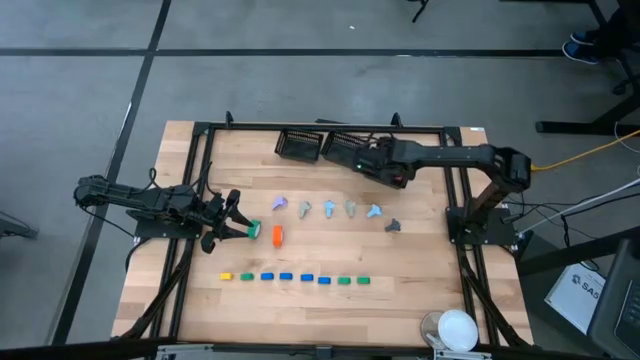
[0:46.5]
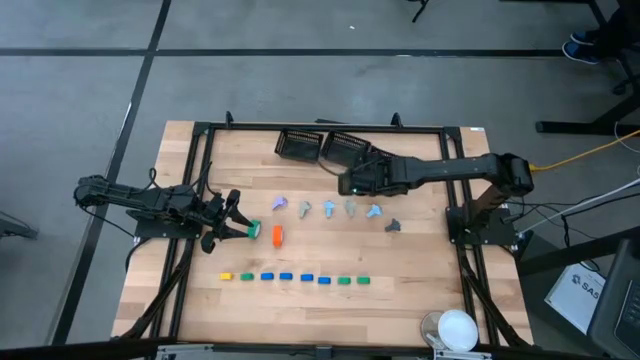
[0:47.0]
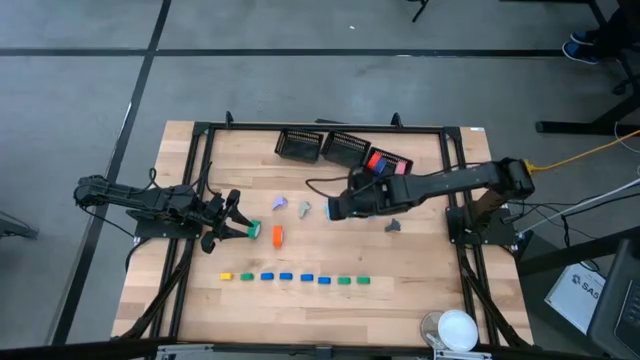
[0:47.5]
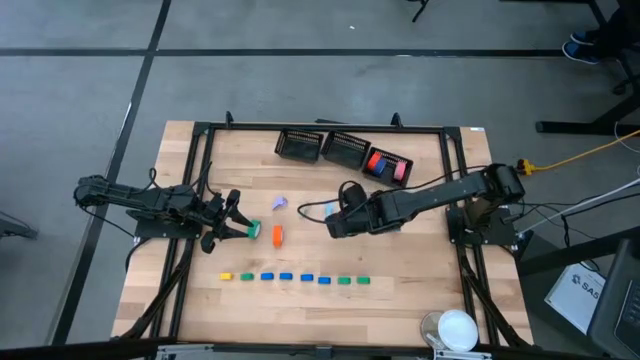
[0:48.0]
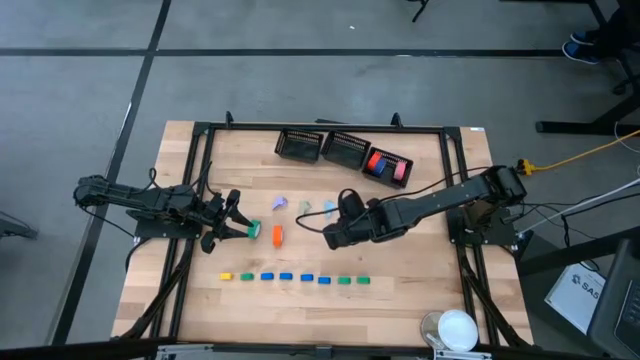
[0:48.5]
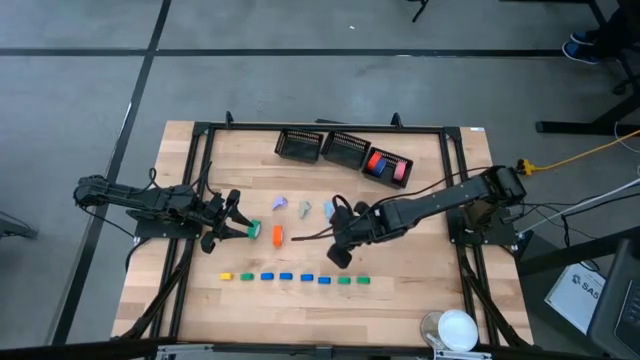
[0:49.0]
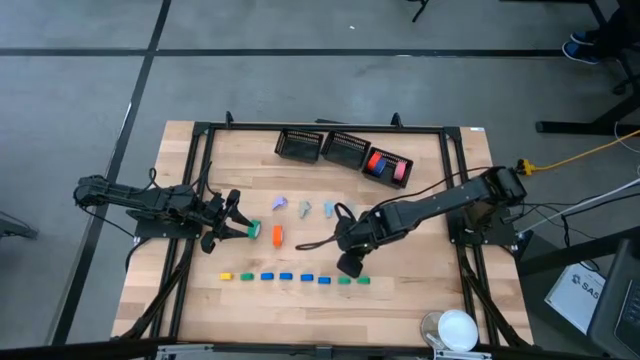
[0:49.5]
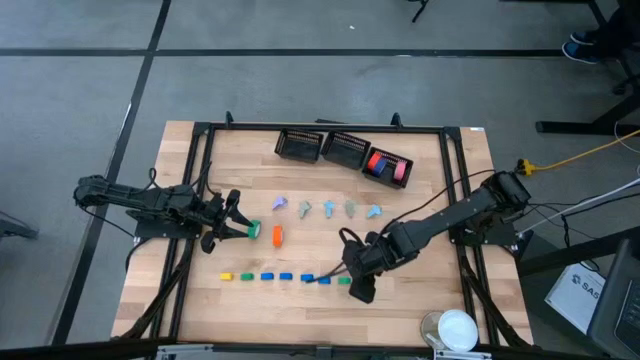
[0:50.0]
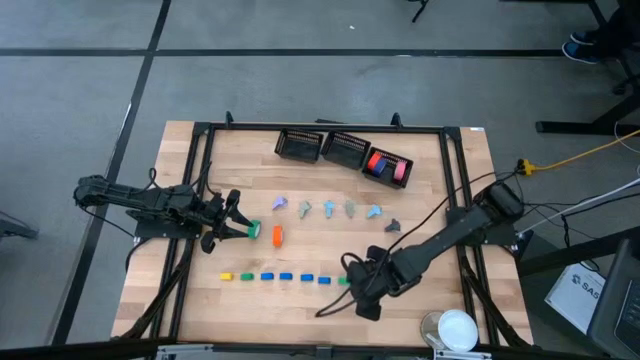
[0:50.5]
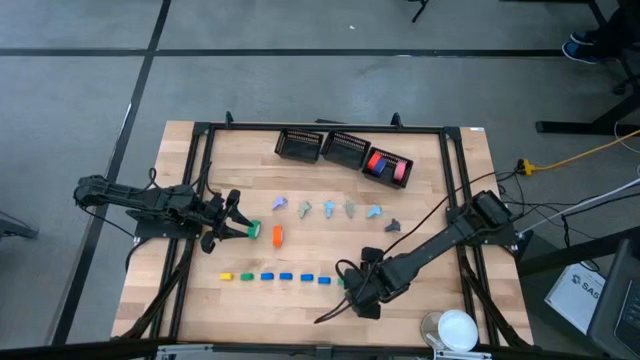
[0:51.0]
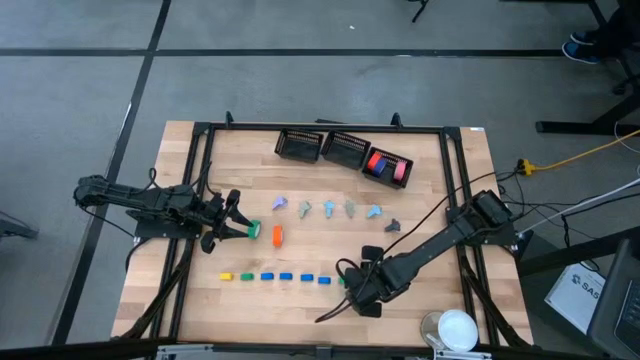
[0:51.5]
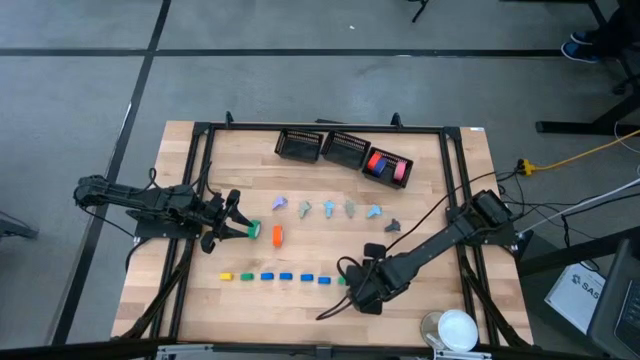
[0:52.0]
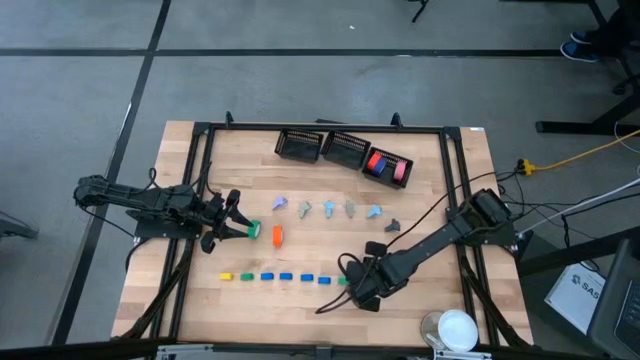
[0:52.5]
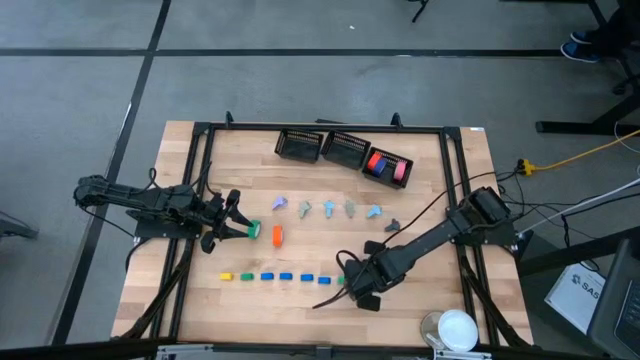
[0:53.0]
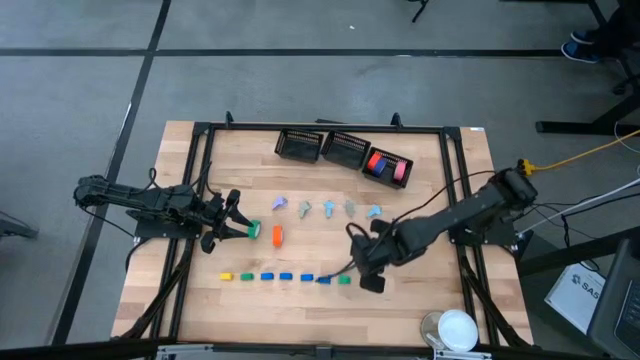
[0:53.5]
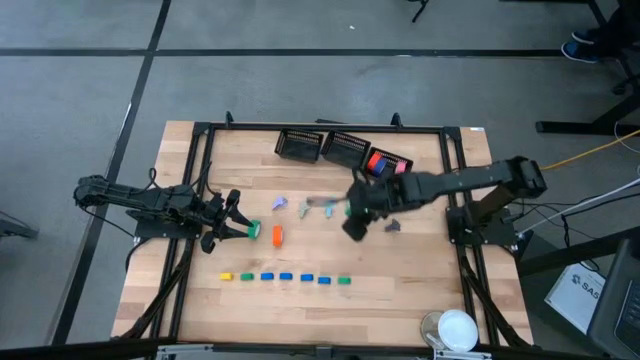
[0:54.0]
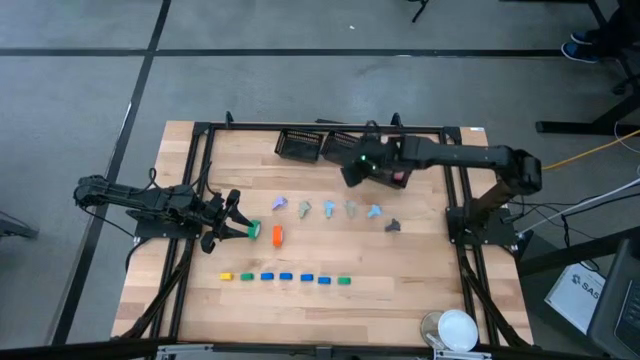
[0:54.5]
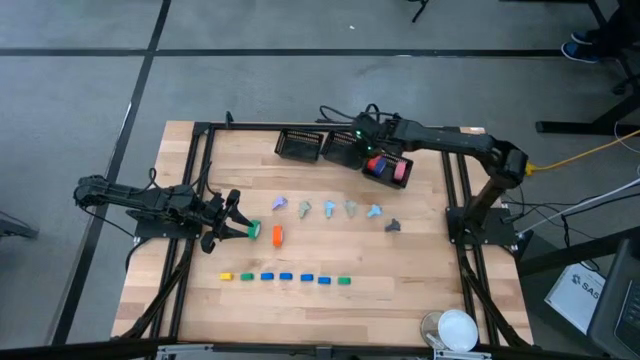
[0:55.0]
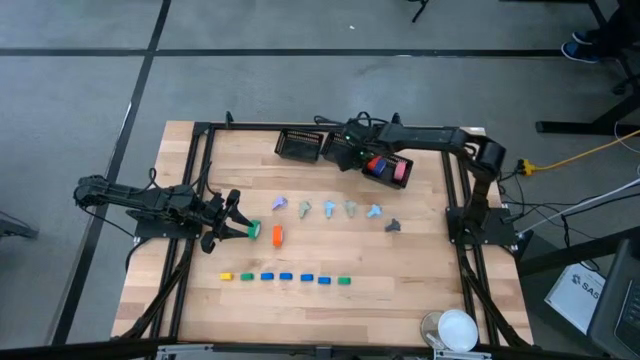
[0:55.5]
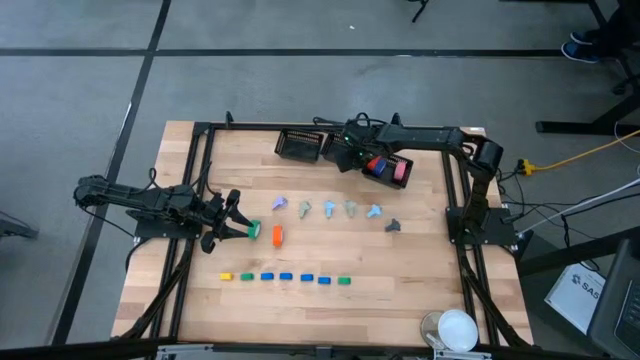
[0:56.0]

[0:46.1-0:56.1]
Task: Pick and place Stapler, Stapler remover, tape
Put the green stapler into the middle black bin

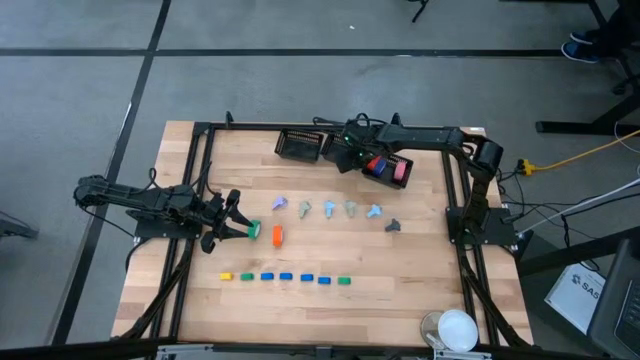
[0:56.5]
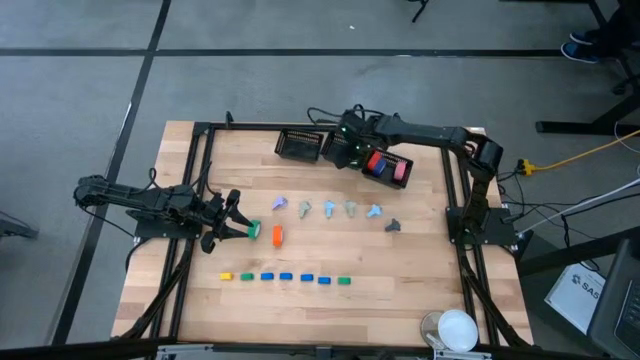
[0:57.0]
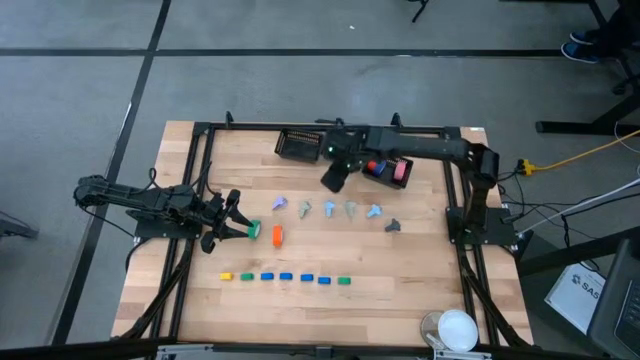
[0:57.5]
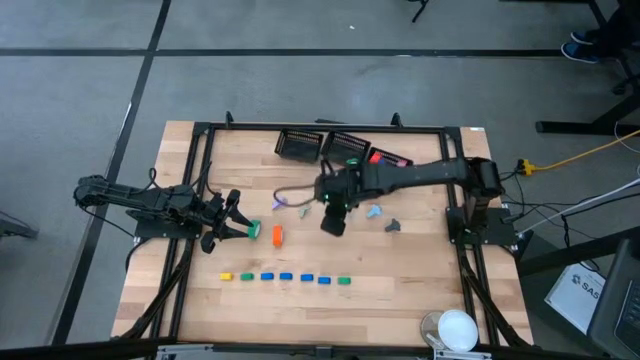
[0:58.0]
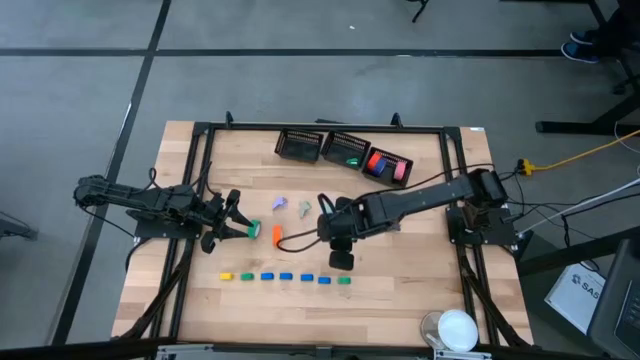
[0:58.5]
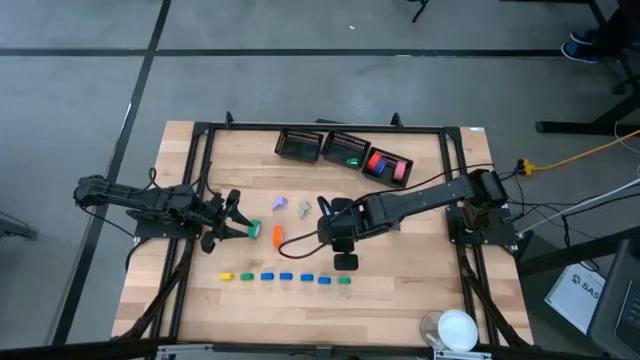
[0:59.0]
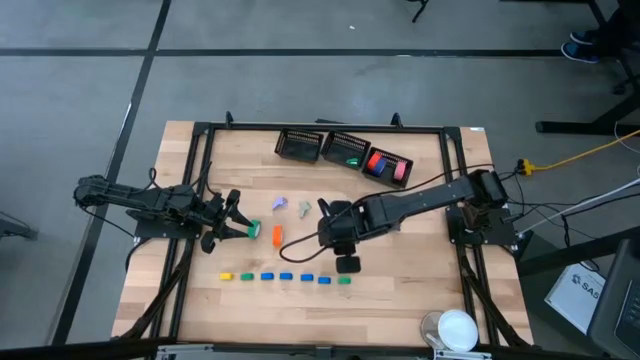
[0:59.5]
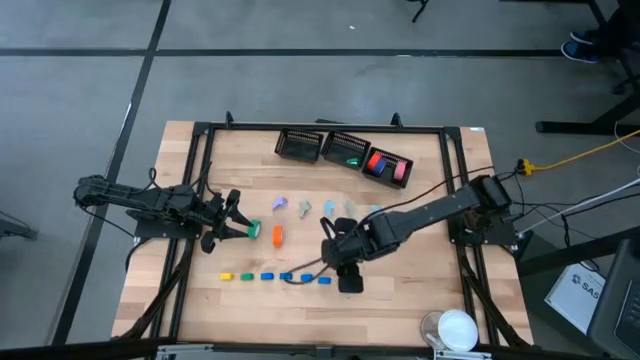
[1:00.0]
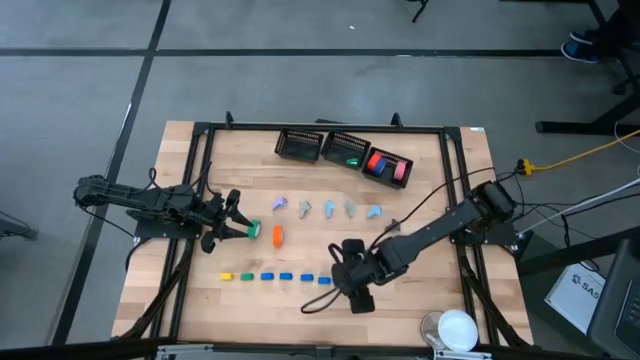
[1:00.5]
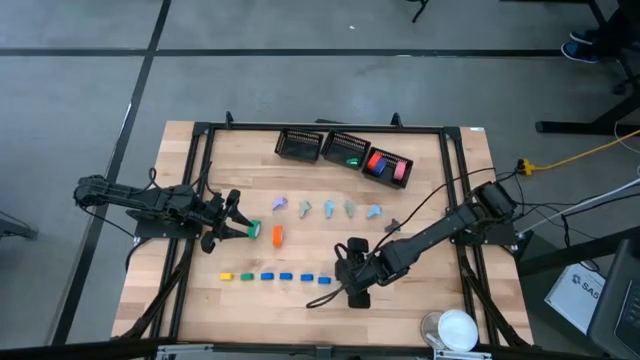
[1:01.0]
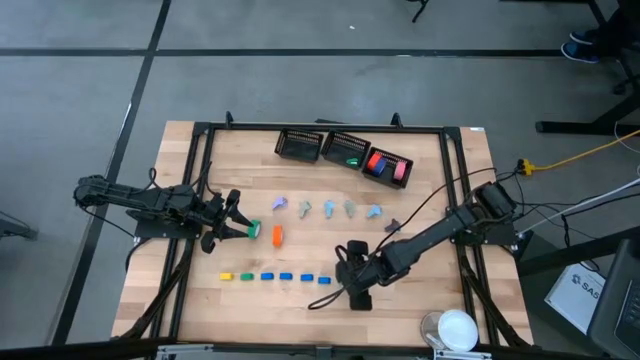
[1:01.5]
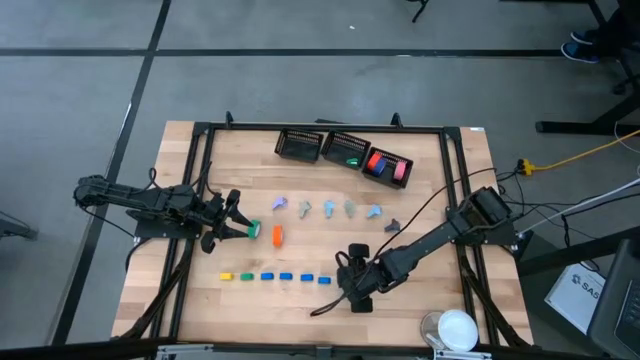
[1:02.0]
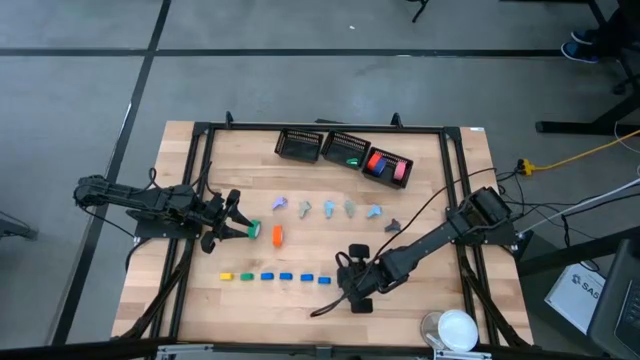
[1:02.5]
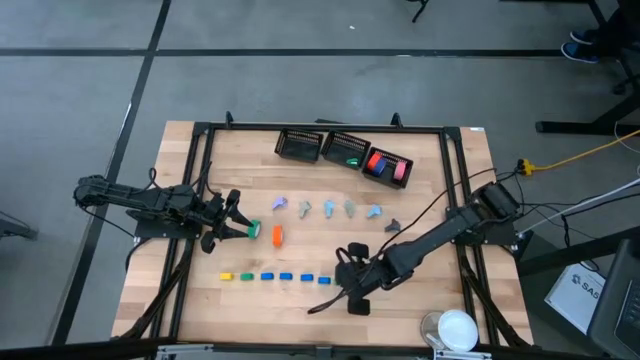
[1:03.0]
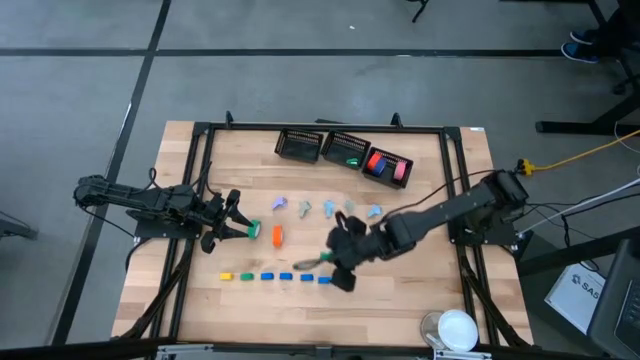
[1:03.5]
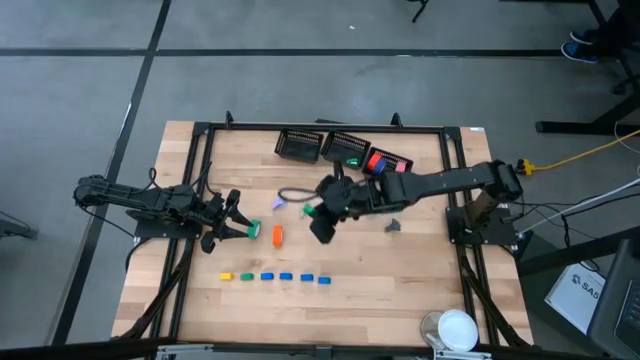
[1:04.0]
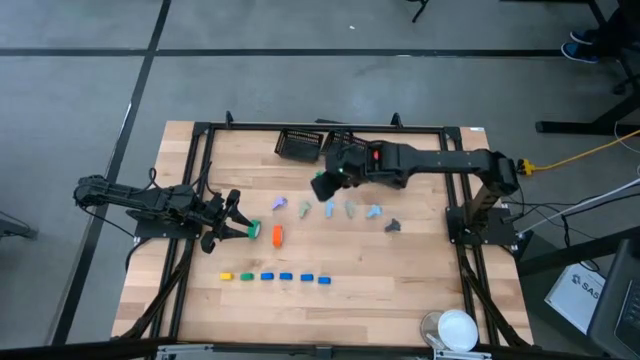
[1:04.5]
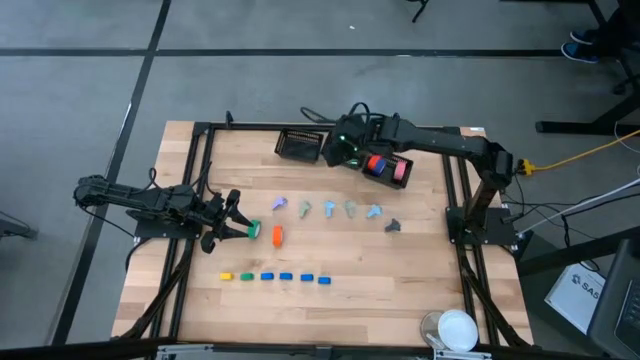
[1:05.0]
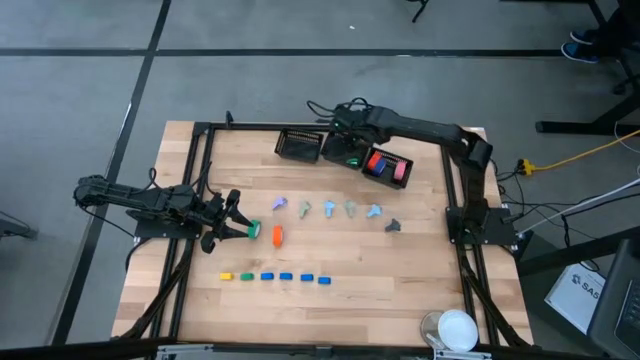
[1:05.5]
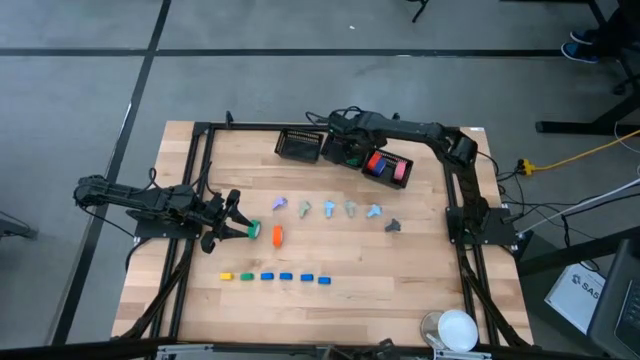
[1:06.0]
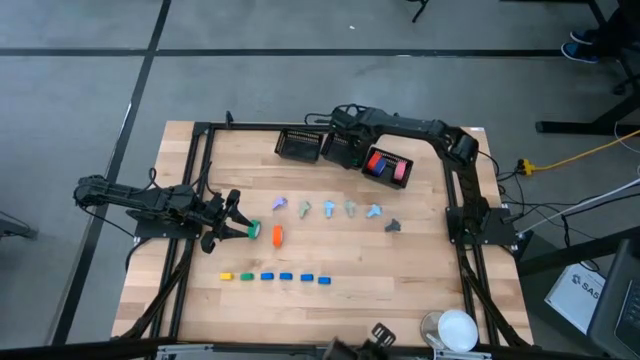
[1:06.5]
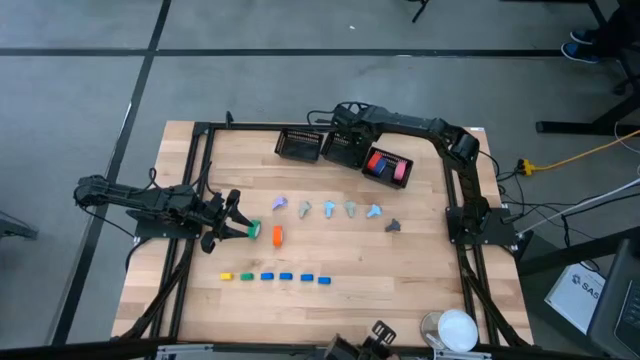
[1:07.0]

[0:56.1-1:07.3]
Put the green stapler into the middle black bin

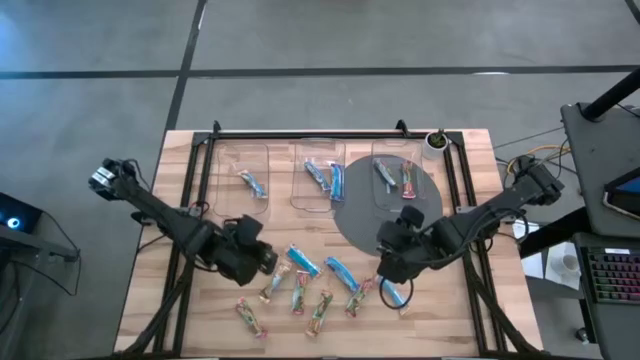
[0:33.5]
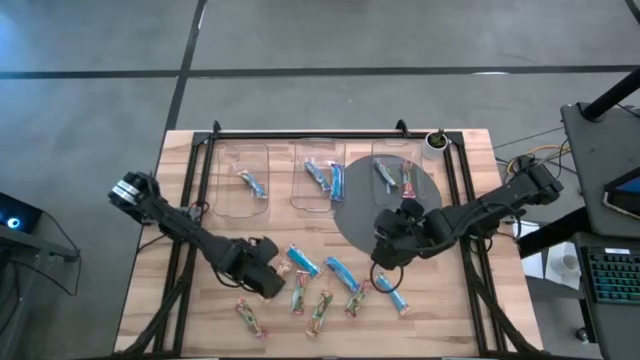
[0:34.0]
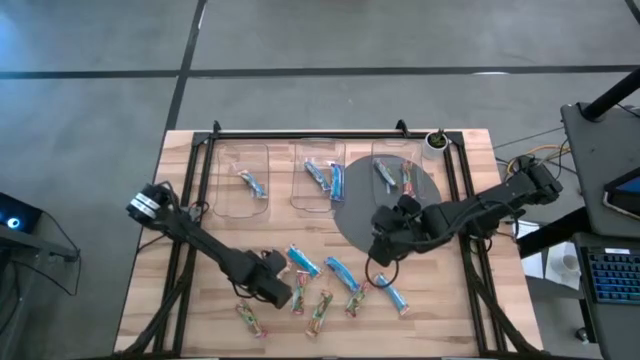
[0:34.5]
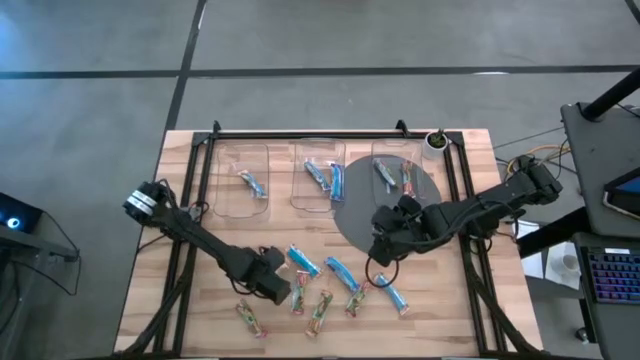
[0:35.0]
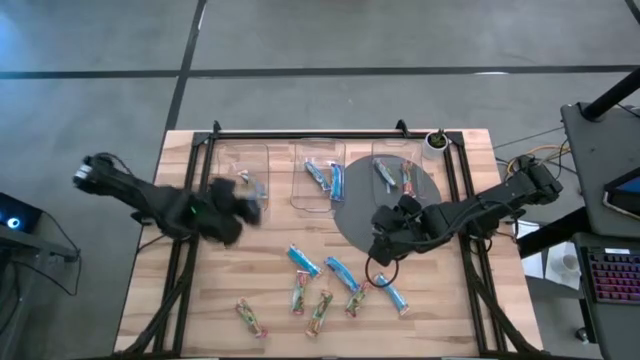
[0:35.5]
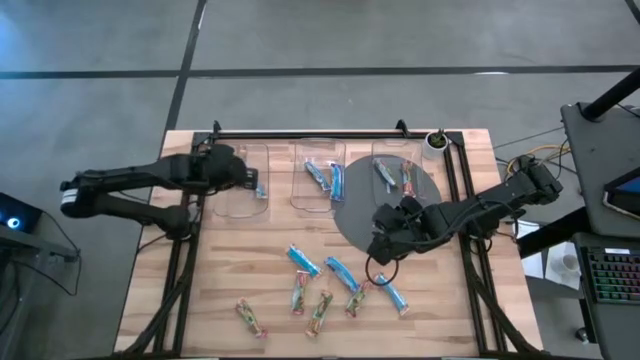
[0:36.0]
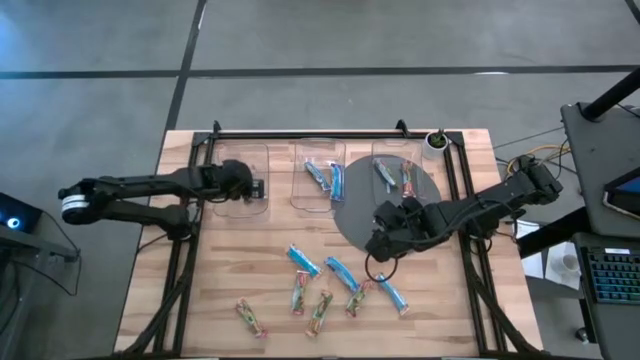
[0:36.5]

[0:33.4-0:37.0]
Task: Pick and place Granola Bars by type
Put the orange granola bar into the left transparent container
